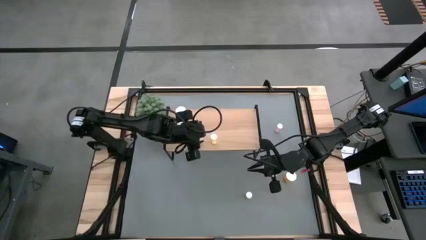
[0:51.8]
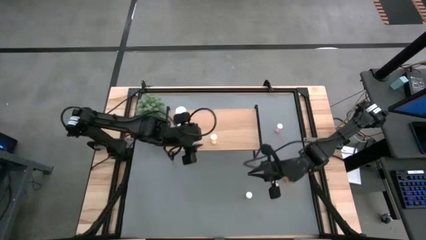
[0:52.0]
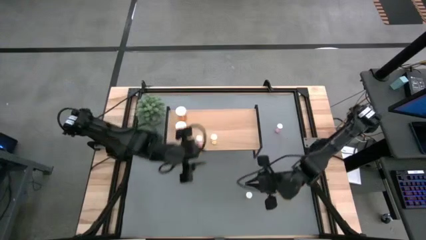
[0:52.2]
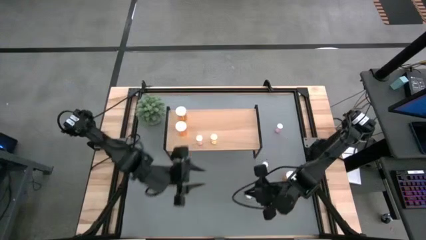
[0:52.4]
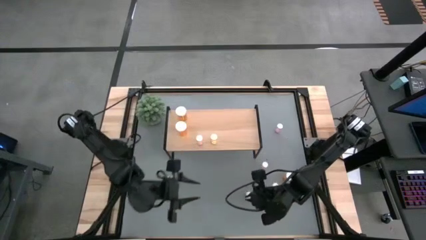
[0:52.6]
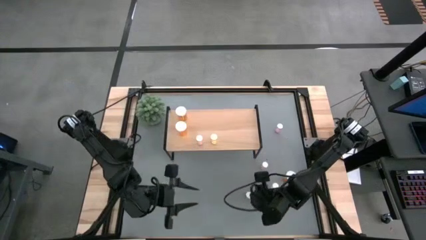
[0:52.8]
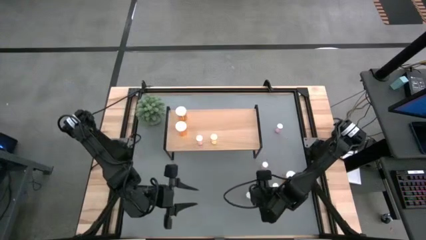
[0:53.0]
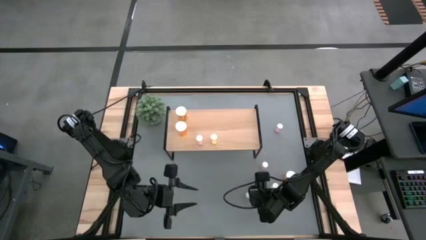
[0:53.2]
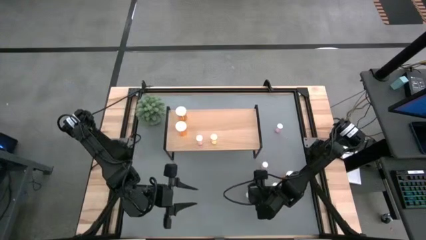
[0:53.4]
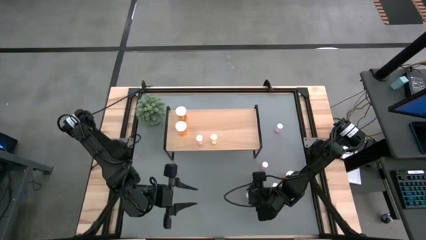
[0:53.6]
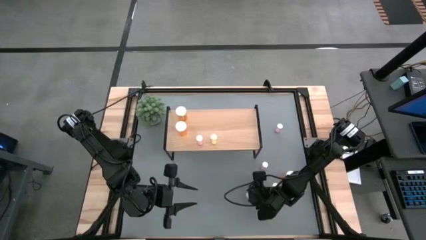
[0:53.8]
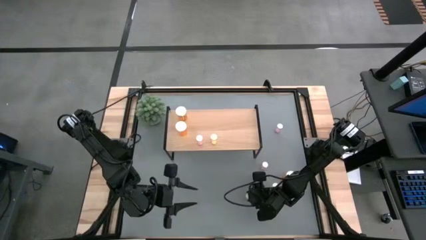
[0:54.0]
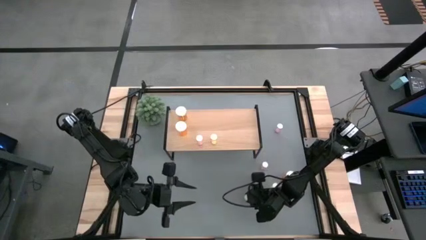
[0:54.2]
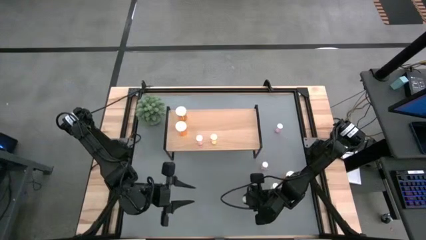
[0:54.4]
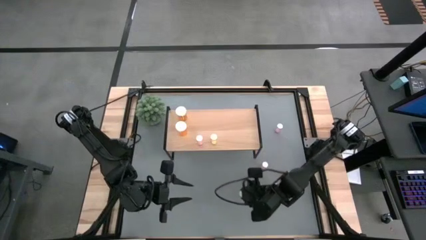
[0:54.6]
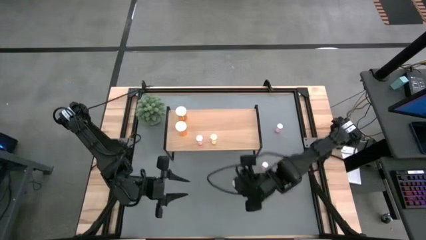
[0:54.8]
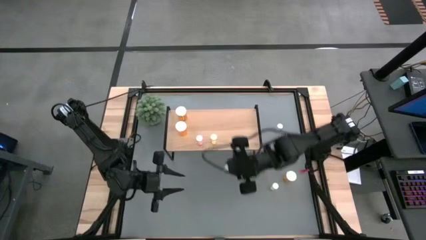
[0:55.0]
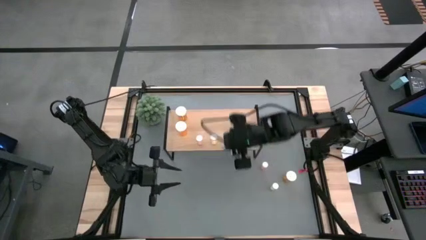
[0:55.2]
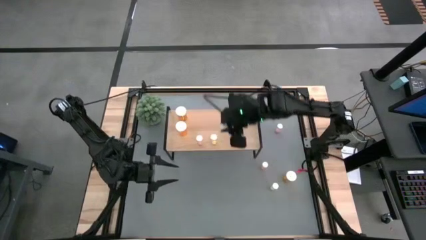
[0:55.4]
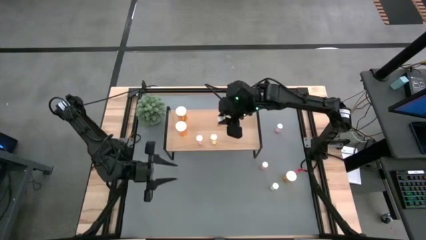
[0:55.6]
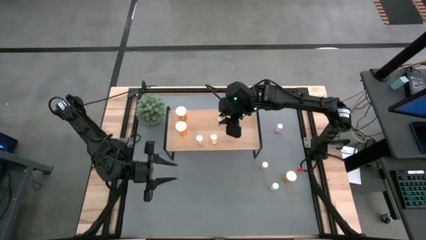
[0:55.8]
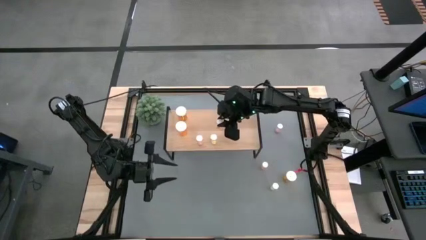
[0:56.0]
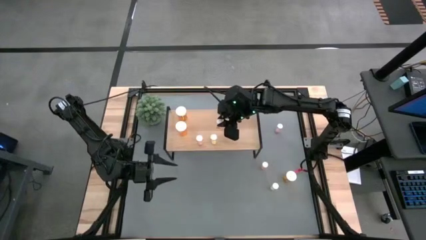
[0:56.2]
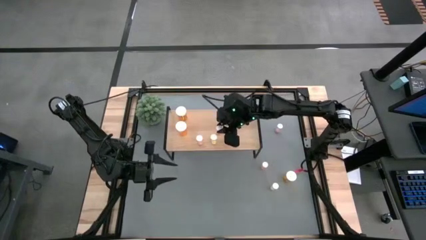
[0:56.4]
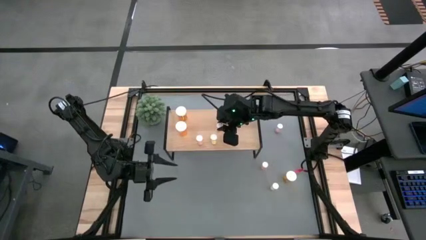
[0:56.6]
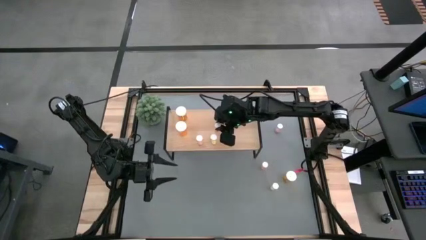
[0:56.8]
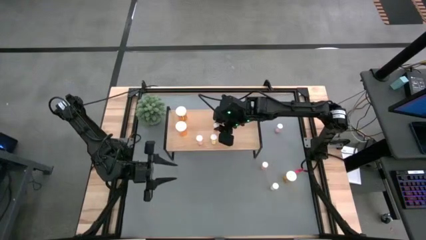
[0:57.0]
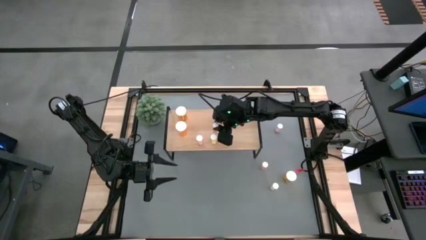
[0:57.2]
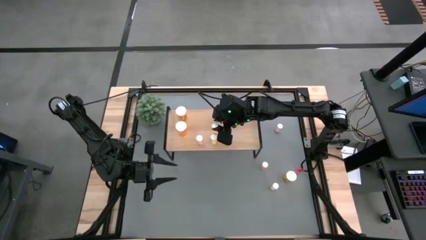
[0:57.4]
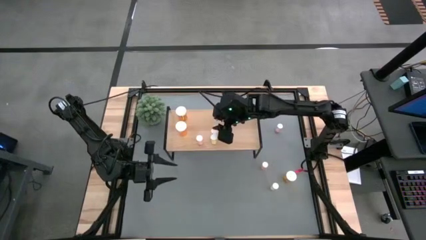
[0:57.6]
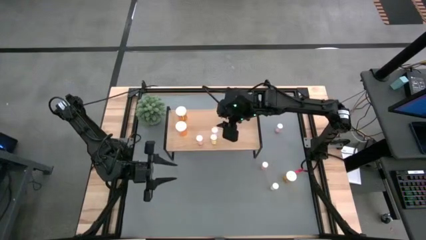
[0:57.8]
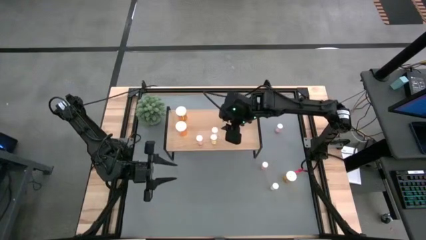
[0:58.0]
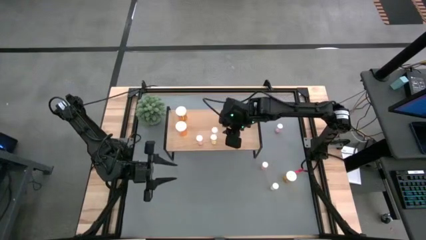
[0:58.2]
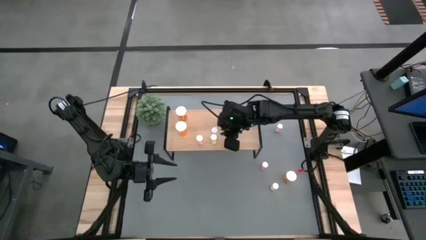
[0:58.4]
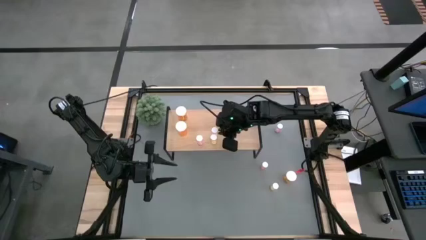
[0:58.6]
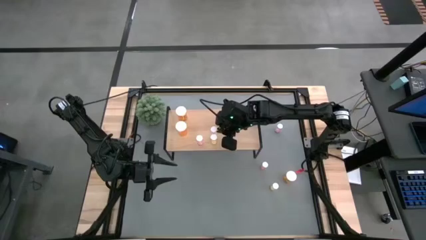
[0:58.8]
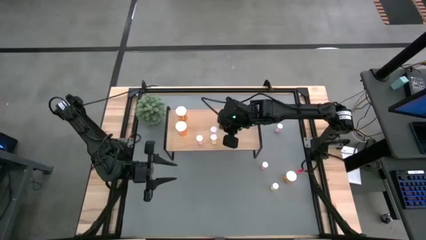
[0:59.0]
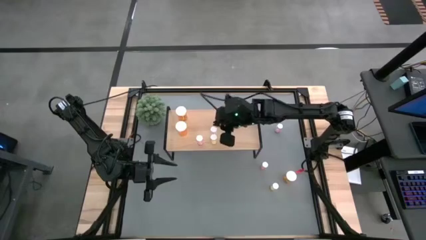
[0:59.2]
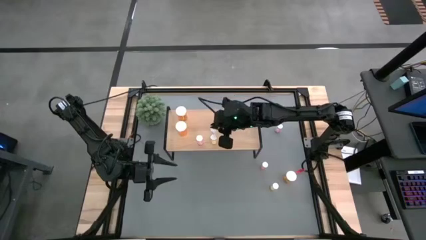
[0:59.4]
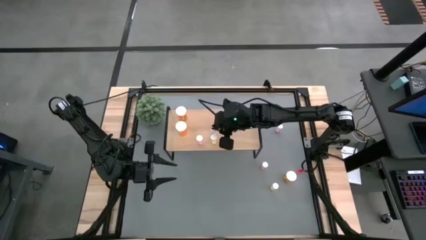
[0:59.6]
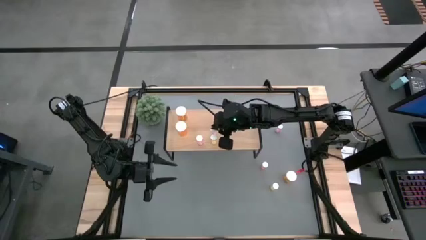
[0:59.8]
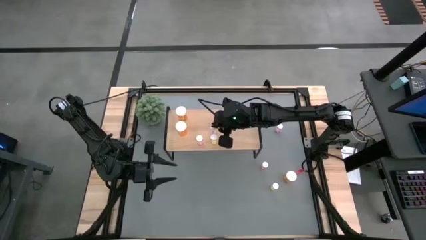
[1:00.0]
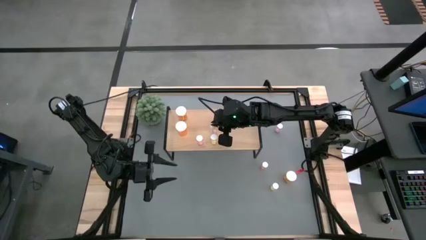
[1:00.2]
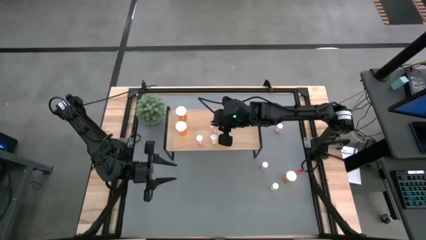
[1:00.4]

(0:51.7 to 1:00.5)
Task: Pick and place medicine bottles onto shelf by color
Put the bottom yellow pill bottle on the shelf aligned with the other yellow pill bottle

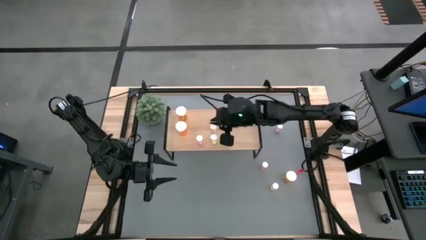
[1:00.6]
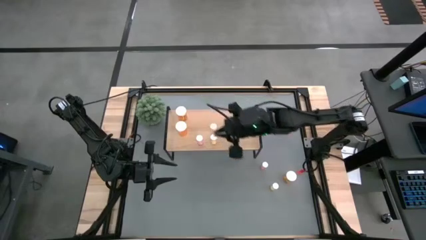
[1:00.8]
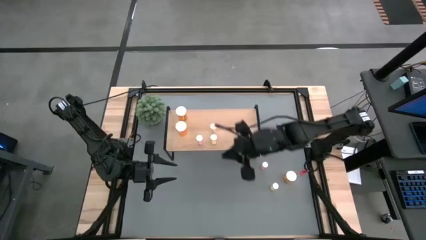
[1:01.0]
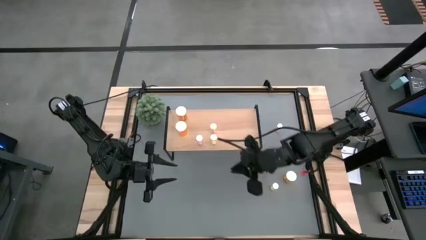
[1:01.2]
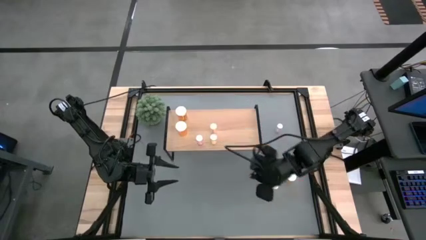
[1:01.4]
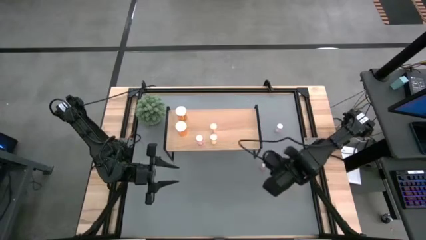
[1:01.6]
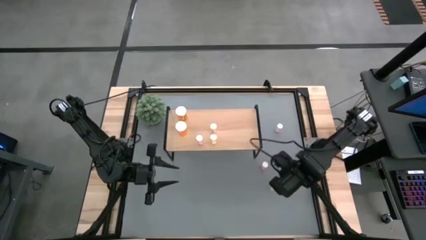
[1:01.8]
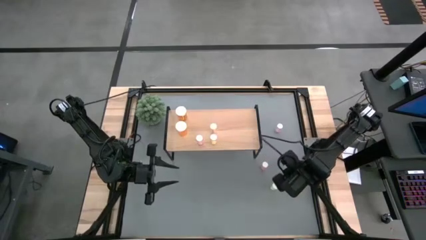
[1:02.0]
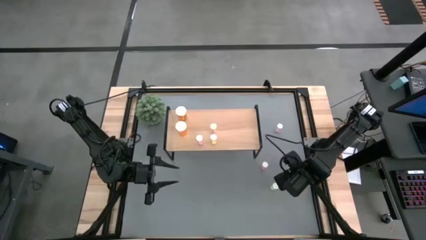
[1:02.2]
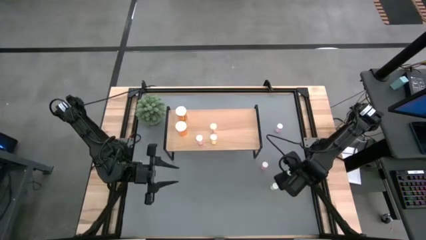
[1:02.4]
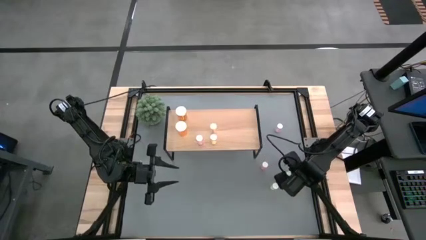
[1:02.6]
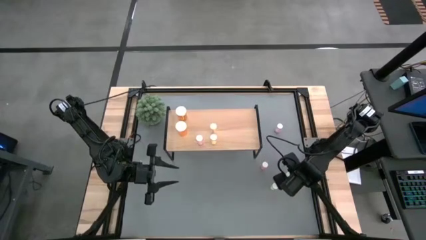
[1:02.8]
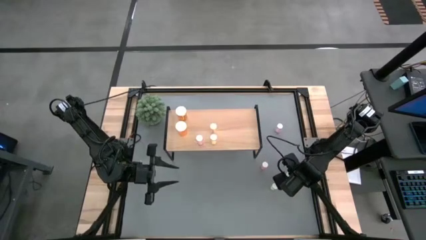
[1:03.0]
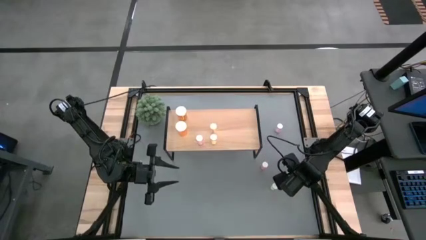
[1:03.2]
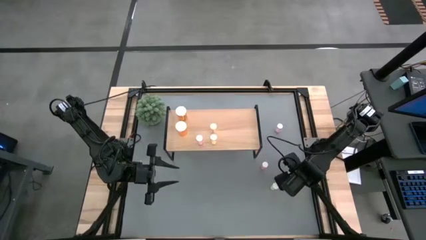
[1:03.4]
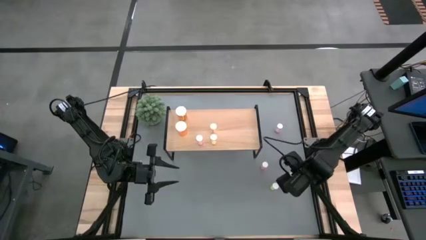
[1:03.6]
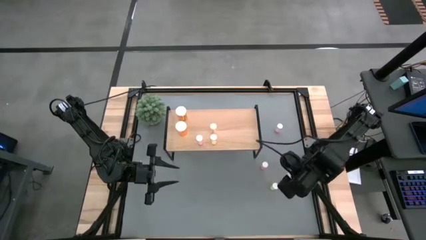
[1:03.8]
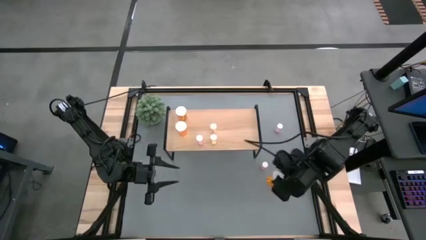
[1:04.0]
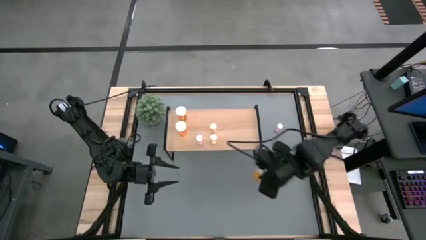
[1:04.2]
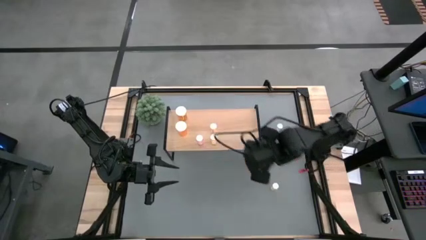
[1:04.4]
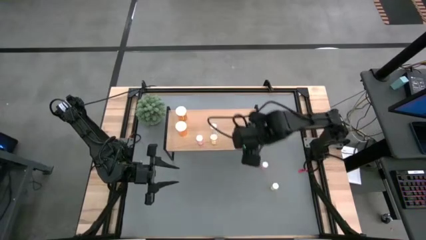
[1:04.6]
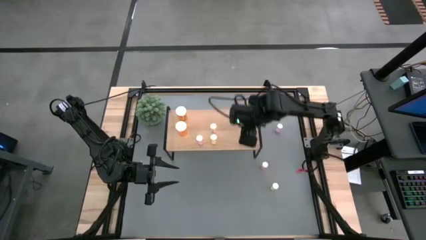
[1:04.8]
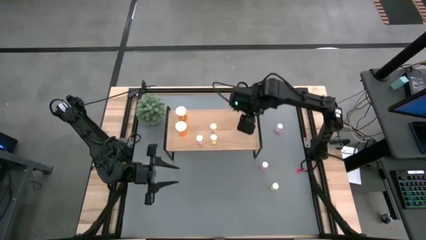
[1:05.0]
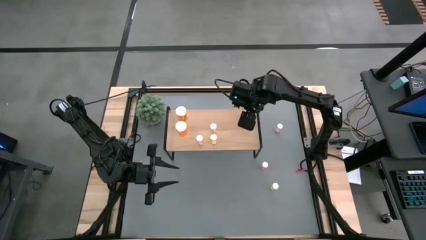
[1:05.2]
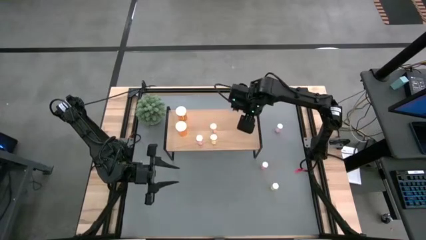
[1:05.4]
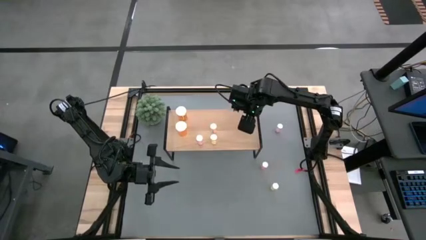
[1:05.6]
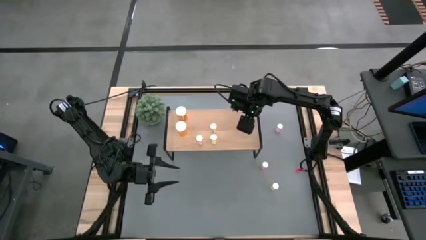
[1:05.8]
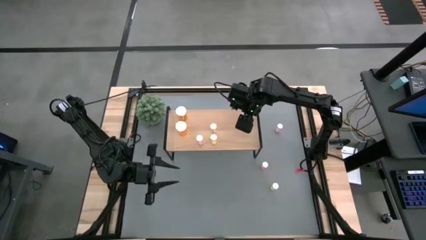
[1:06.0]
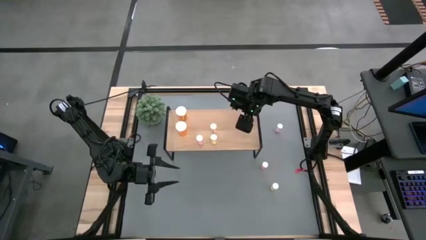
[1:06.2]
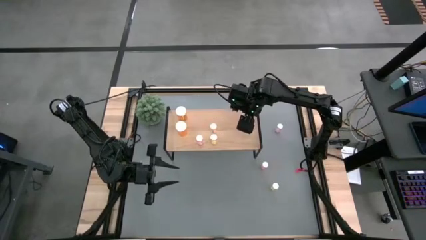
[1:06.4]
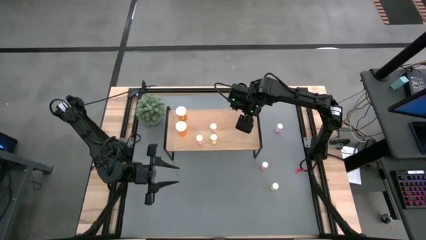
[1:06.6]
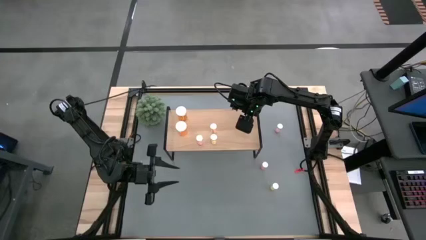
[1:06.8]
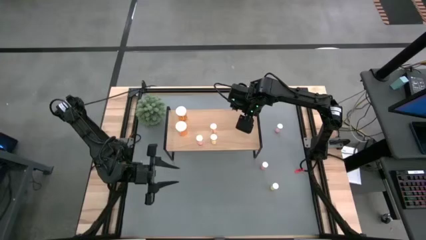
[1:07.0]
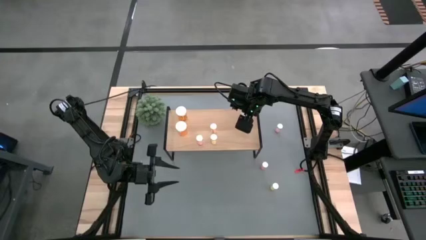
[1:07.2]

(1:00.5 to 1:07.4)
Put the orange pill bottle on the shelf
